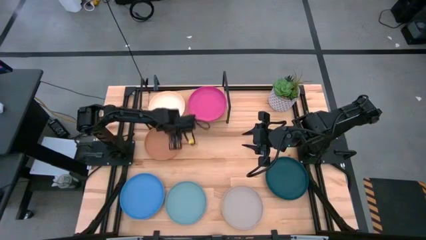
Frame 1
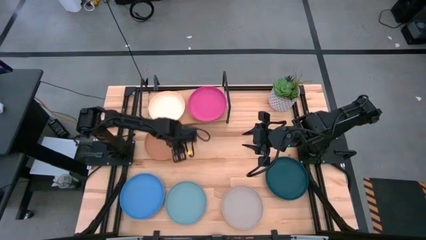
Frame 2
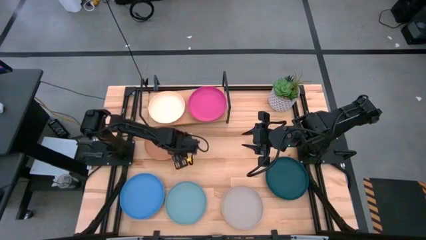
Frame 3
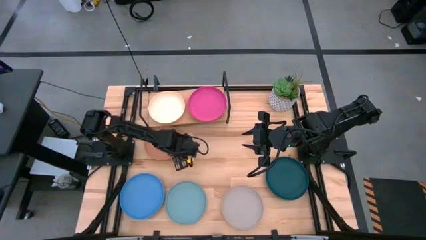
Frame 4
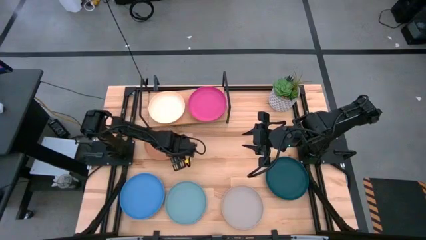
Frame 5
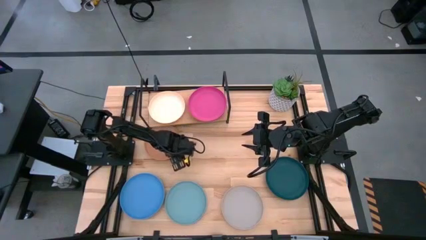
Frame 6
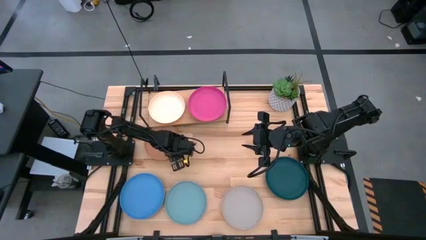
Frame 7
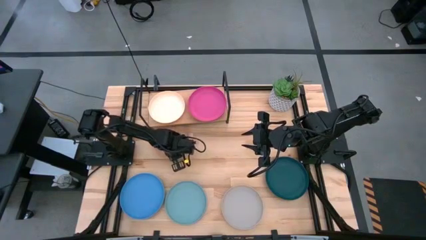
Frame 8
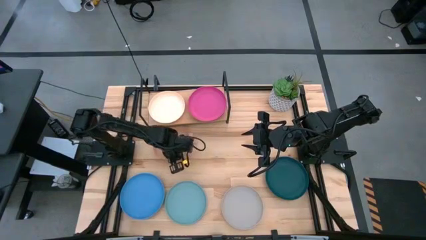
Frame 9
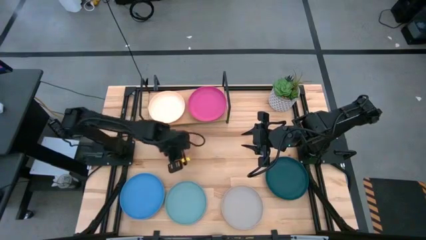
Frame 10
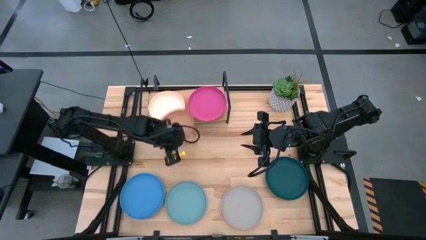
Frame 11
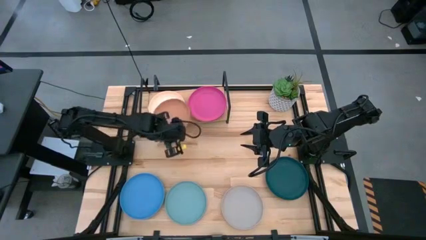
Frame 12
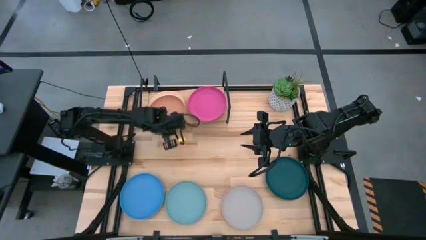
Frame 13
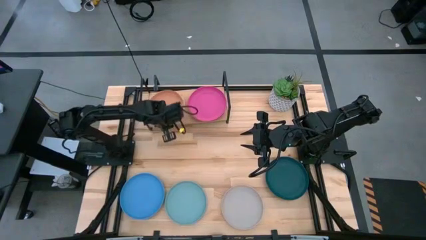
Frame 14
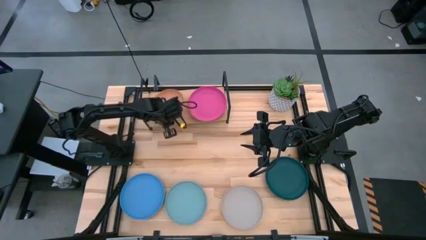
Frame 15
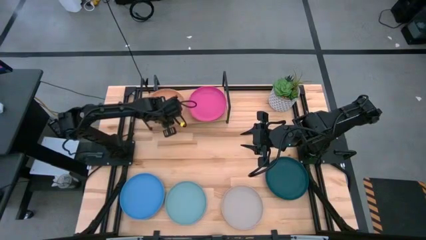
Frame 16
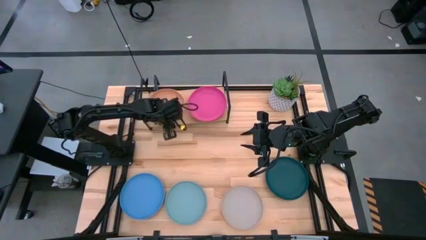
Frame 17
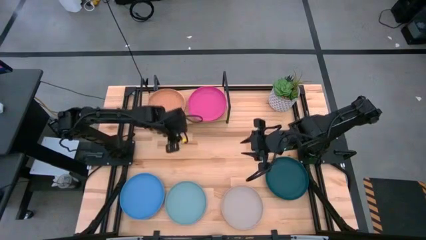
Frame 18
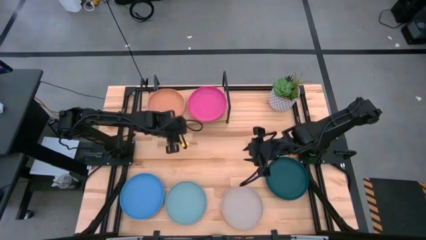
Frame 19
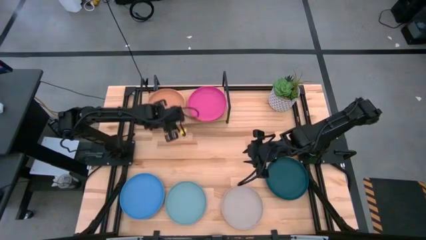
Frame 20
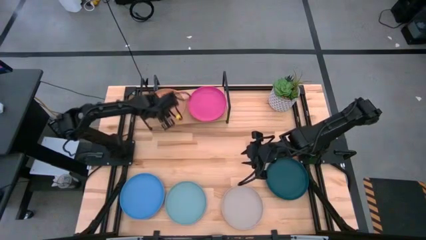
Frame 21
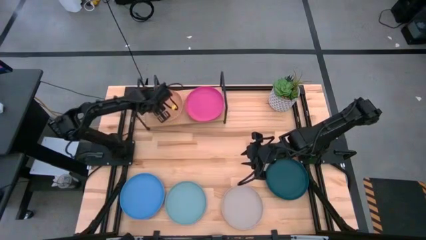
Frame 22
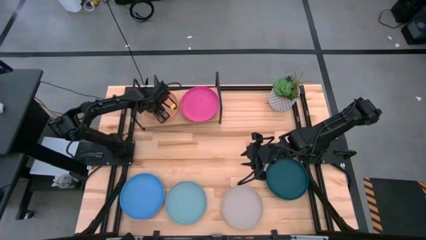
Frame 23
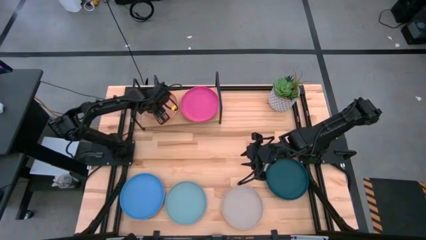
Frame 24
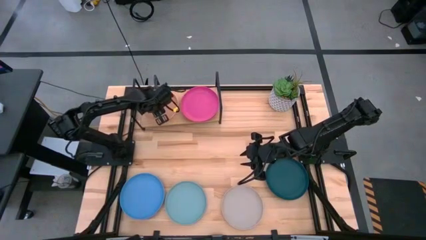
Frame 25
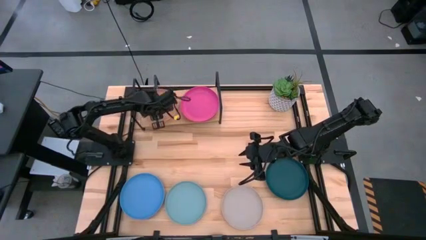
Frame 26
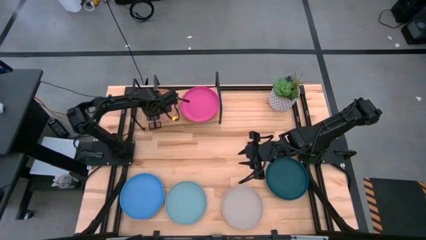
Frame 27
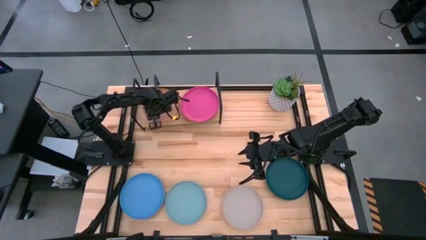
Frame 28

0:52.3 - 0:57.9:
Task: Place and stack plates onto a shelf
Stack the brown plate on the white plate

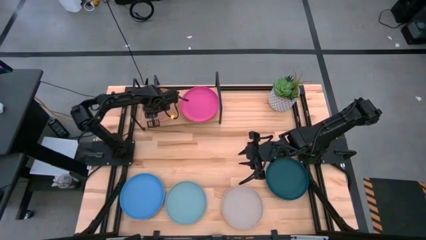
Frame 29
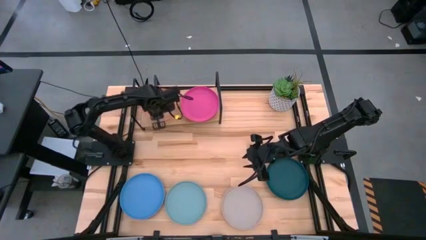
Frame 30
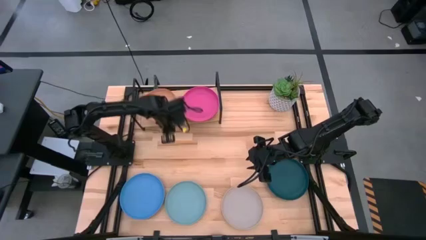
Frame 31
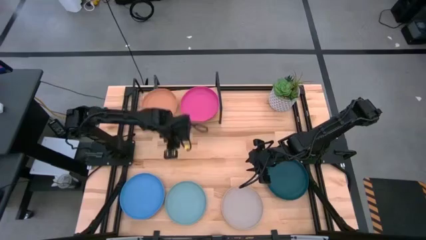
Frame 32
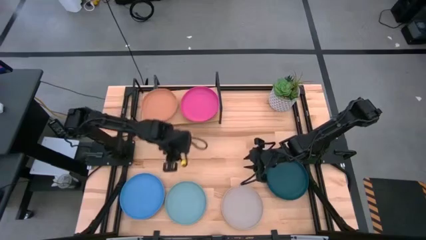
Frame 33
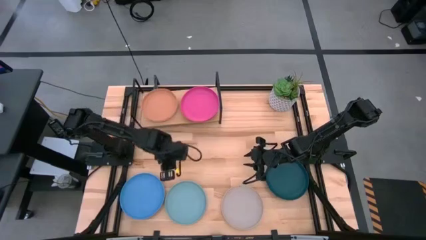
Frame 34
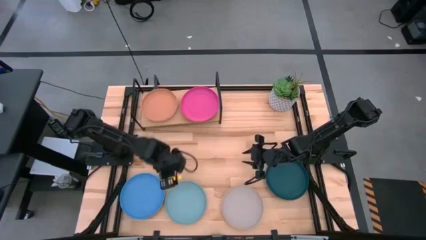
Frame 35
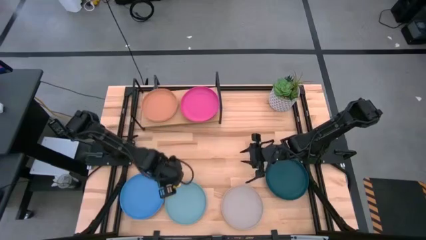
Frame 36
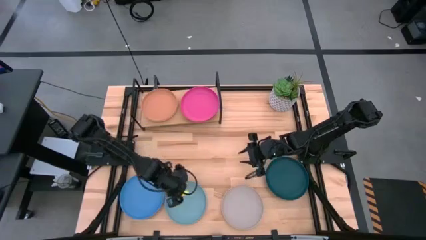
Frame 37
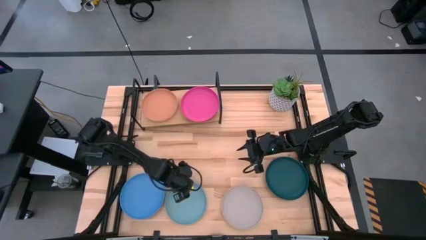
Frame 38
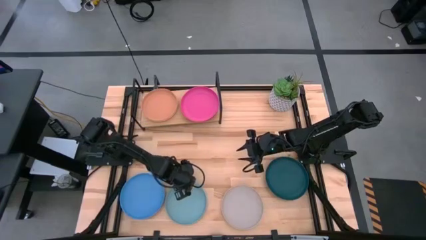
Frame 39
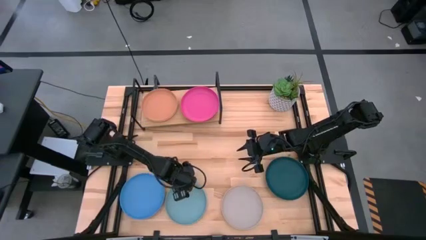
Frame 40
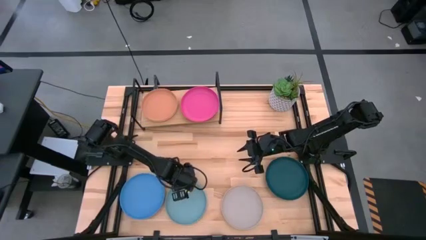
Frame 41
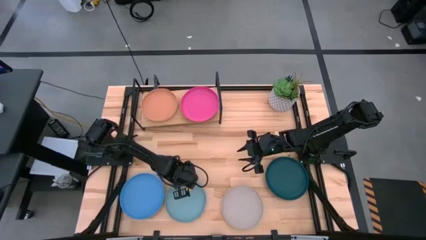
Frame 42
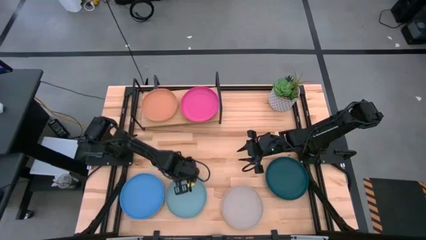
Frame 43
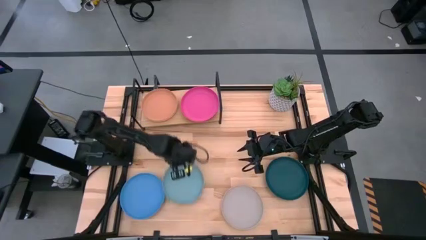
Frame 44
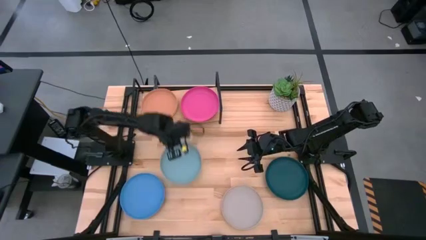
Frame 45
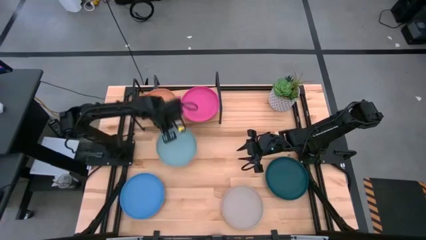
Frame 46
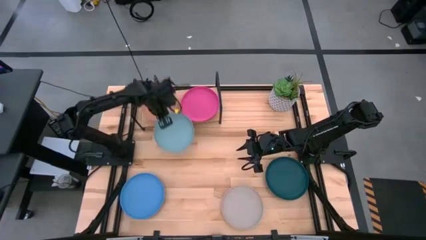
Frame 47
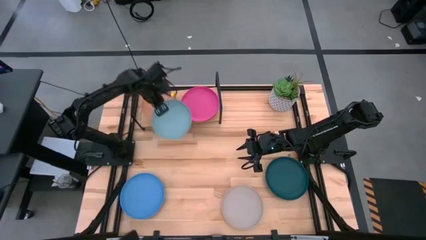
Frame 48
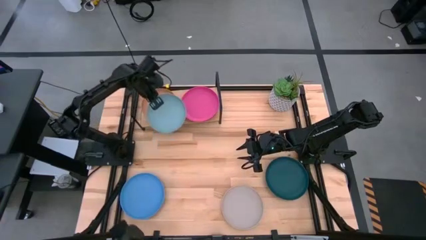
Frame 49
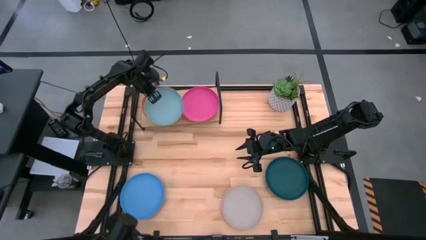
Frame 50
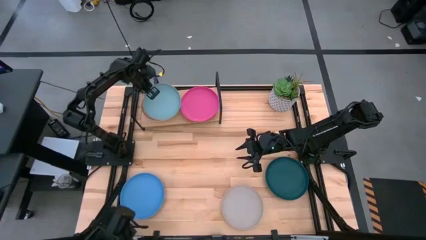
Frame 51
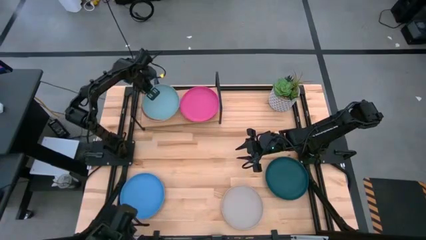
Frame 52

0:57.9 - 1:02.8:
Stack the light blue plate on the brown plate

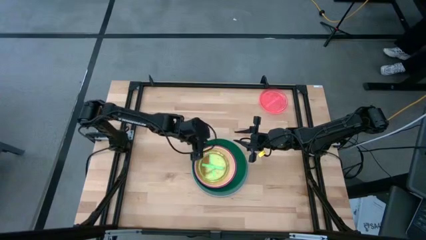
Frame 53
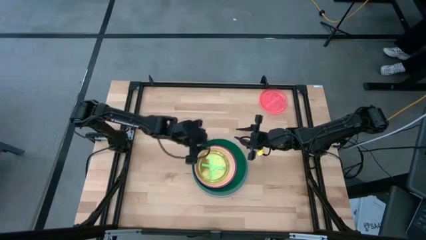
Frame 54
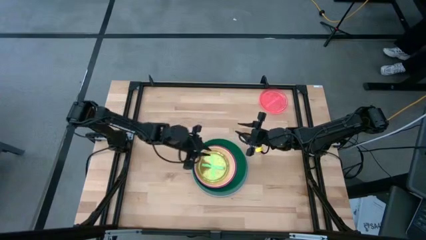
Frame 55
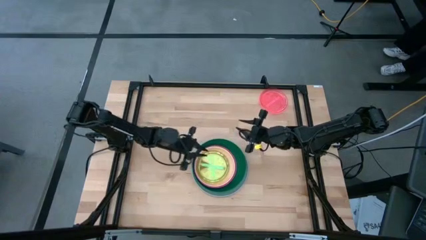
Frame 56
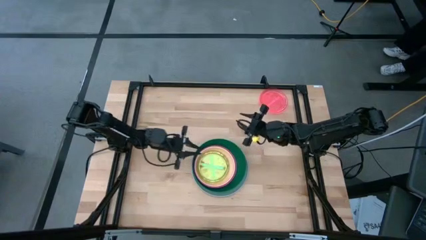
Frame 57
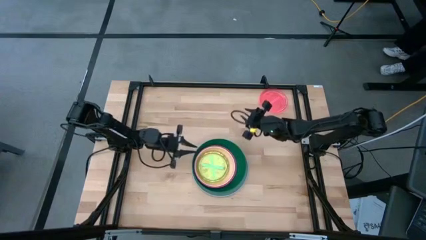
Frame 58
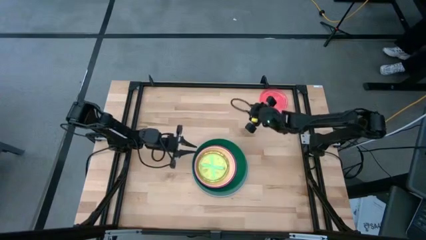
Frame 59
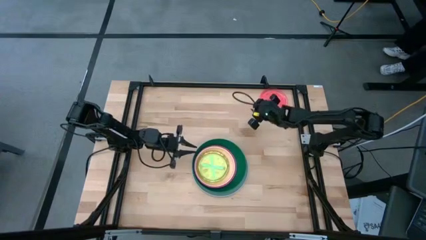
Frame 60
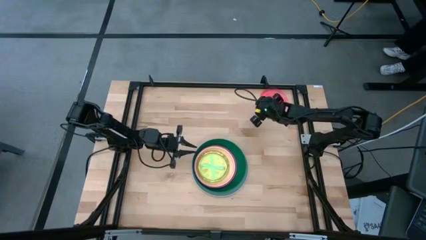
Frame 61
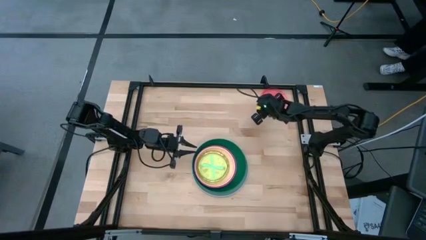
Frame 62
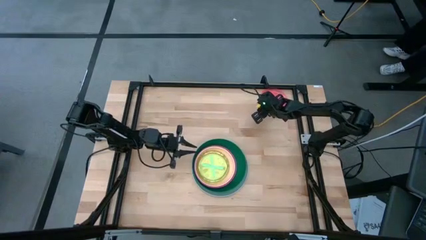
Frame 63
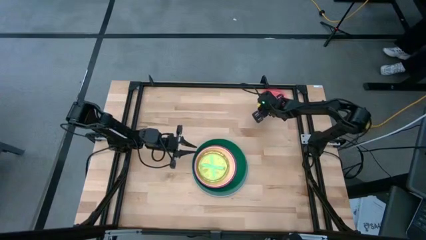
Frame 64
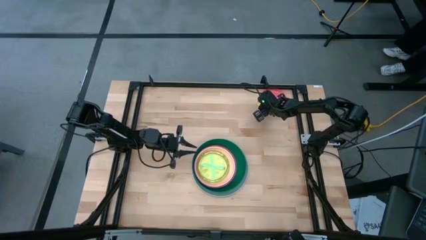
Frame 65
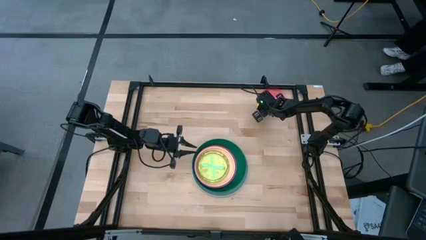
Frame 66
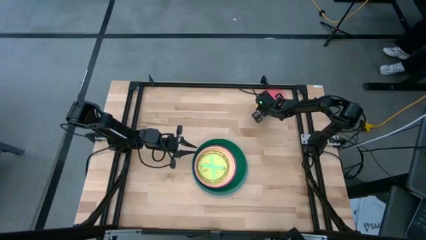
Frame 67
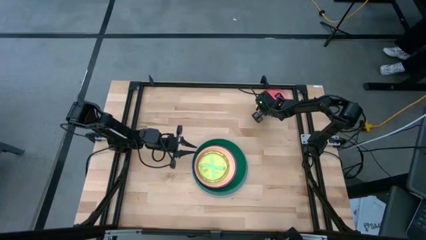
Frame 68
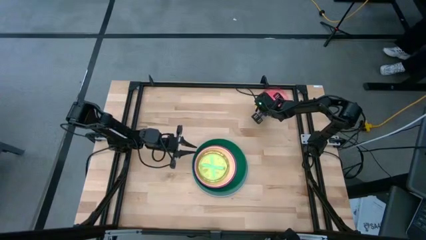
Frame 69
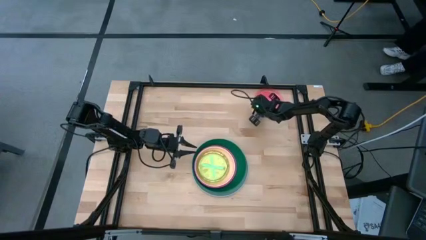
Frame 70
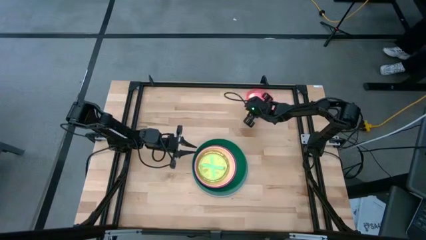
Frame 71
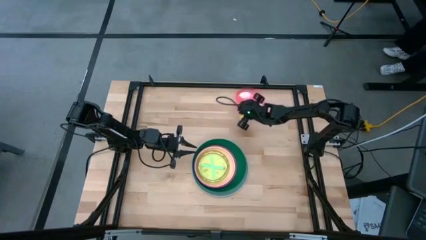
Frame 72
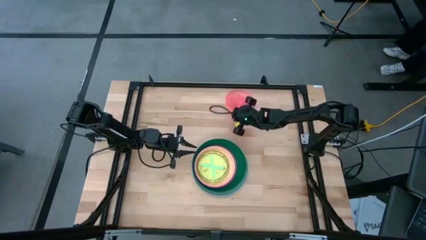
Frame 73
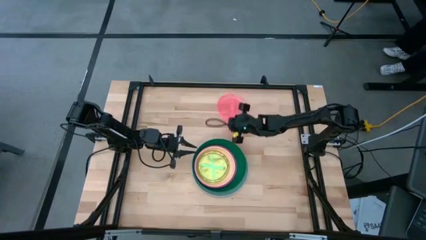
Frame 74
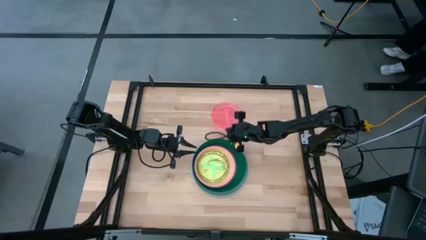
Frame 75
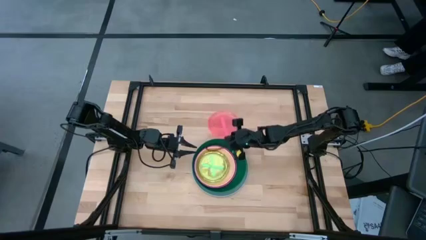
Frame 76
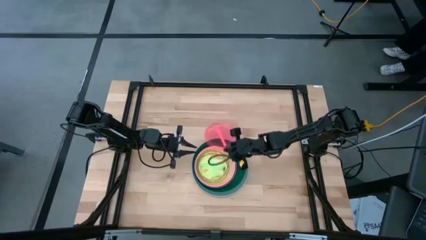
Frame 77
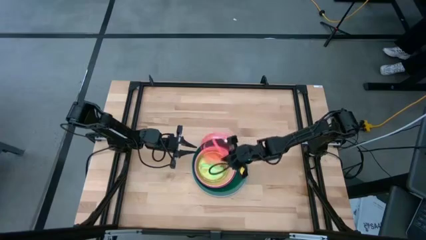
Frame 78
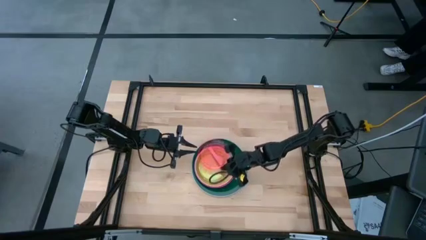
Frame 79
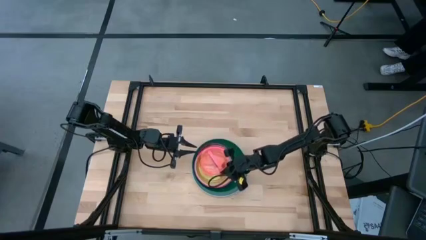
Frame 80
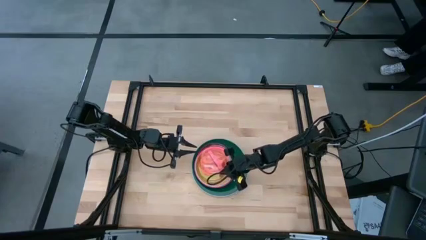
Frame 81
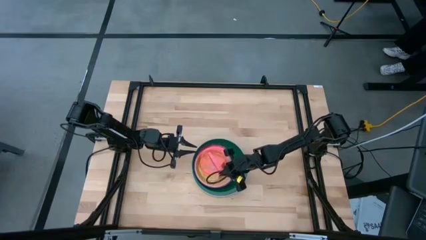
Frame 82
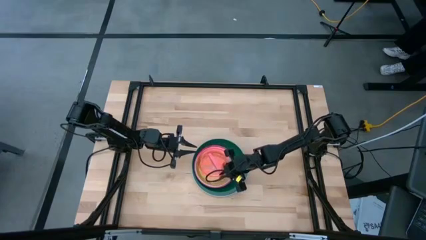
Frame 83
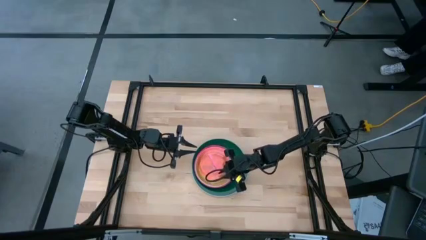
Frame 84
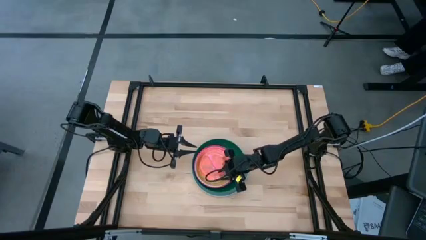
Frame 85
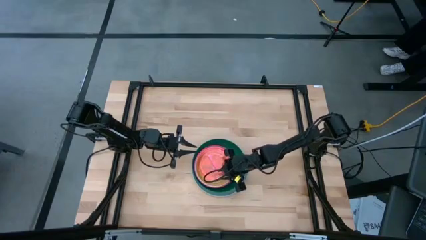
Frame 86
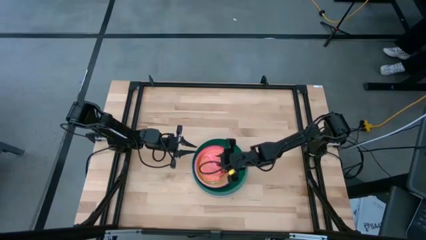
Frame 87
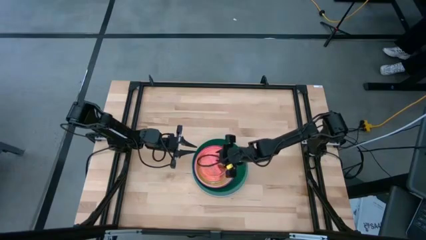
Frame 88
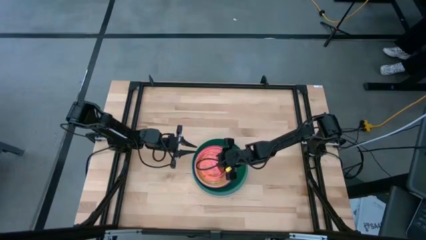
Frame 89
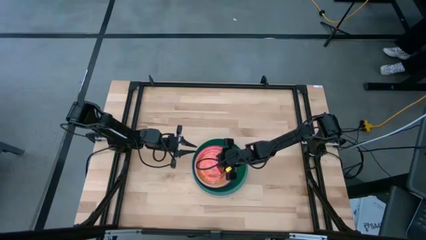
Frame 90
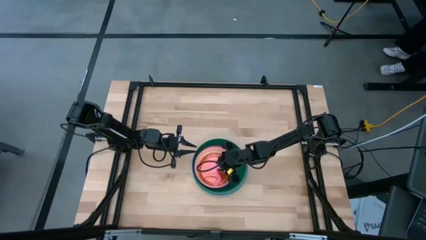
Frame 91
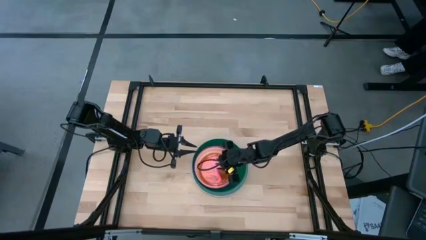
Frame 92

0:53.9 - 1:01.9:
Task: Stack plastic plates
Stack the pink transparent plate on top of the green transparent plate
